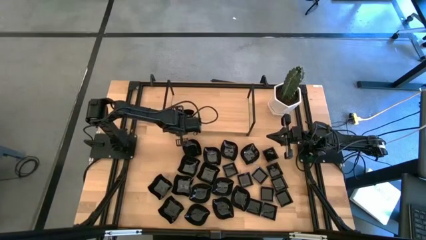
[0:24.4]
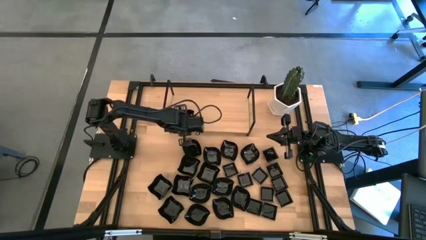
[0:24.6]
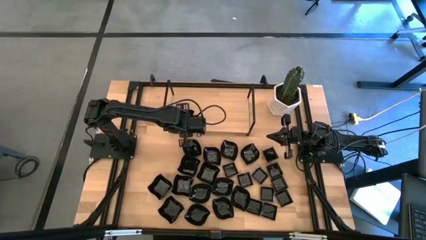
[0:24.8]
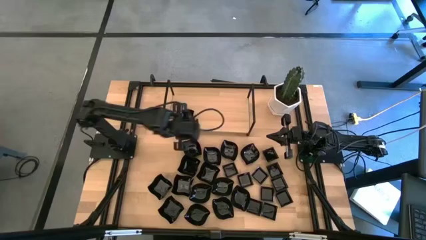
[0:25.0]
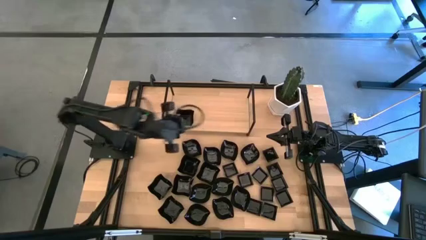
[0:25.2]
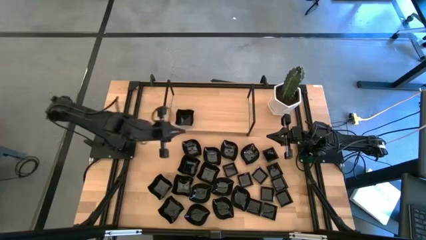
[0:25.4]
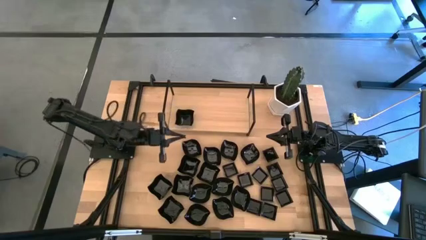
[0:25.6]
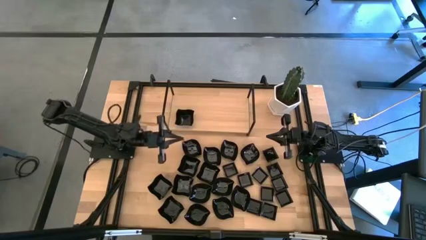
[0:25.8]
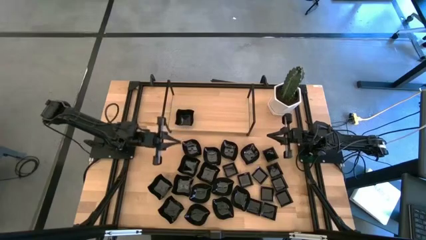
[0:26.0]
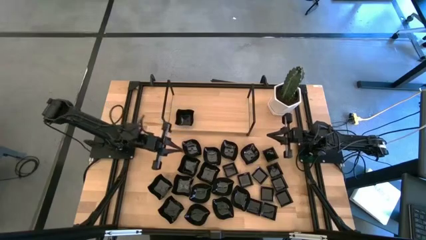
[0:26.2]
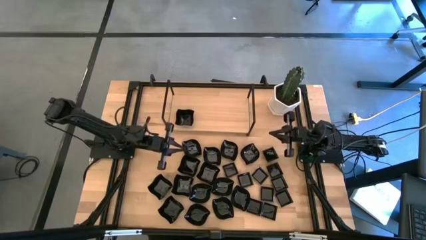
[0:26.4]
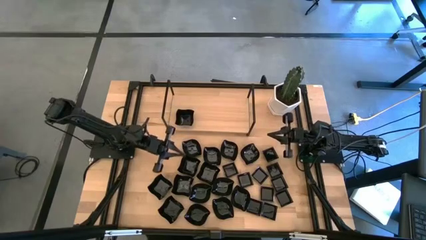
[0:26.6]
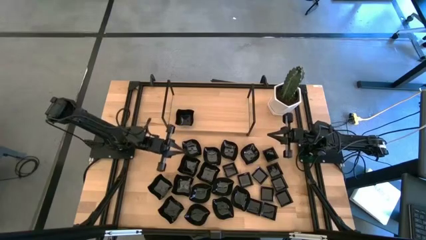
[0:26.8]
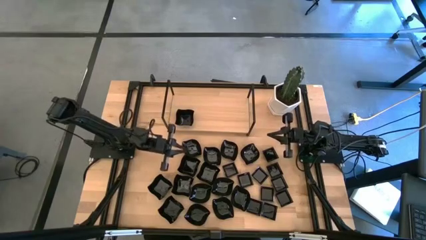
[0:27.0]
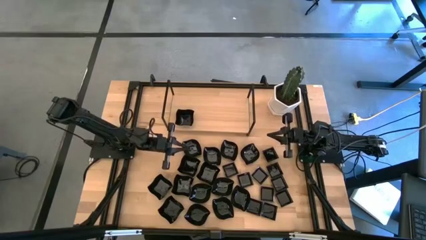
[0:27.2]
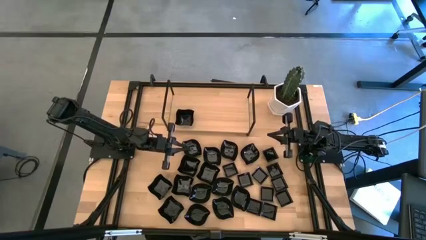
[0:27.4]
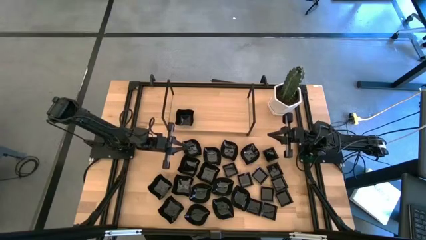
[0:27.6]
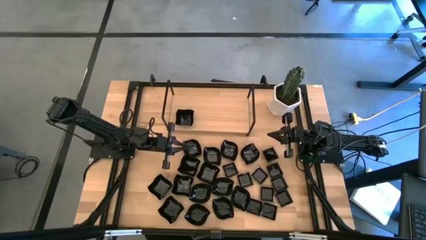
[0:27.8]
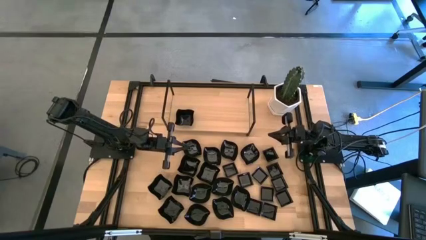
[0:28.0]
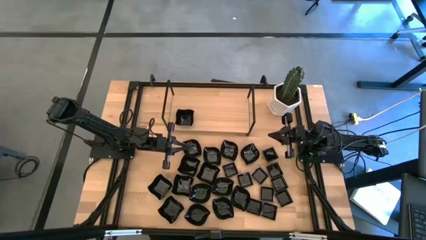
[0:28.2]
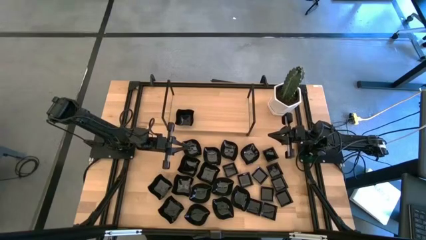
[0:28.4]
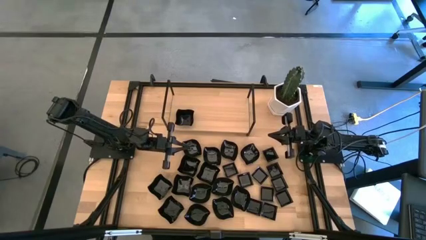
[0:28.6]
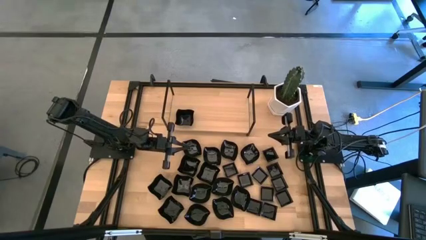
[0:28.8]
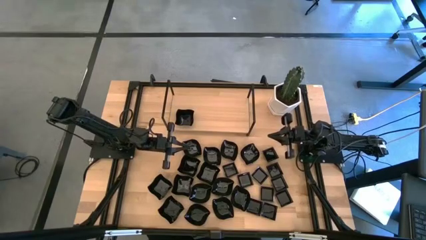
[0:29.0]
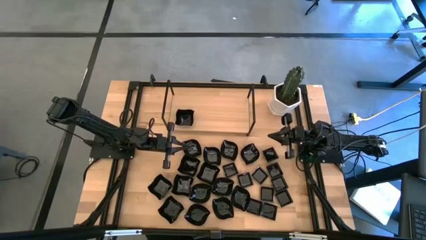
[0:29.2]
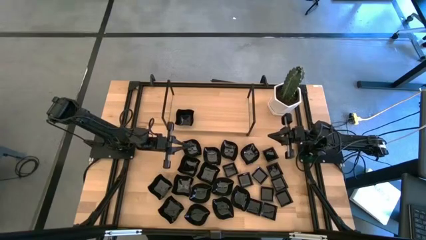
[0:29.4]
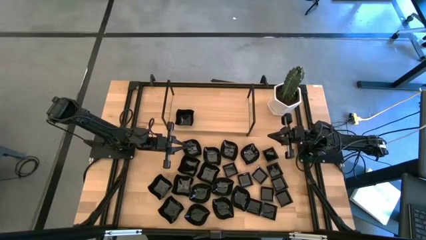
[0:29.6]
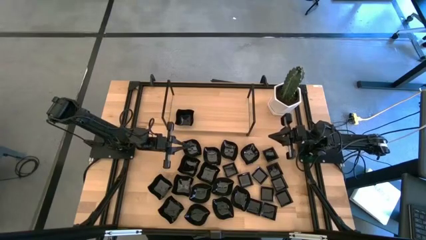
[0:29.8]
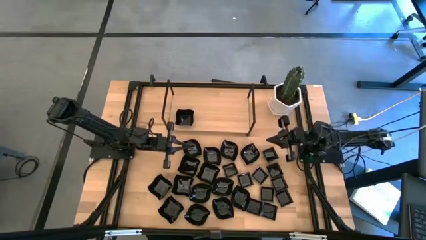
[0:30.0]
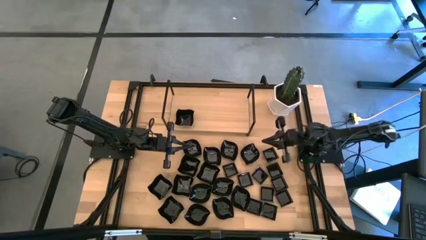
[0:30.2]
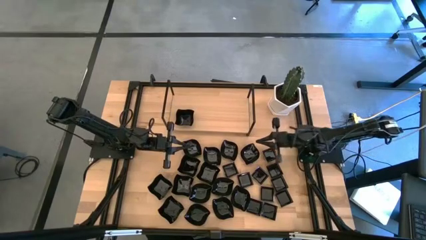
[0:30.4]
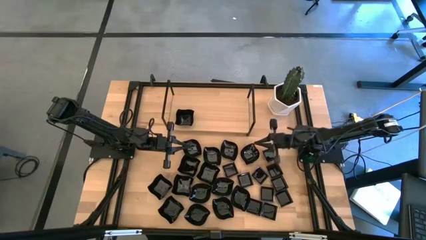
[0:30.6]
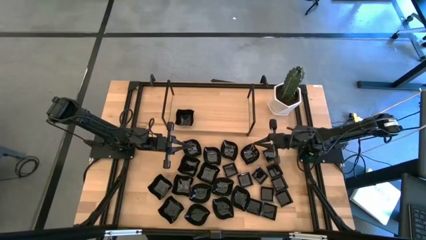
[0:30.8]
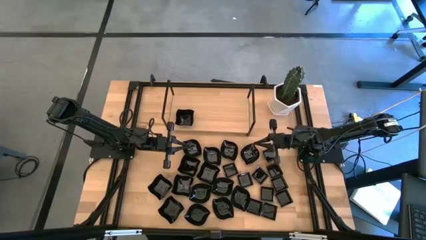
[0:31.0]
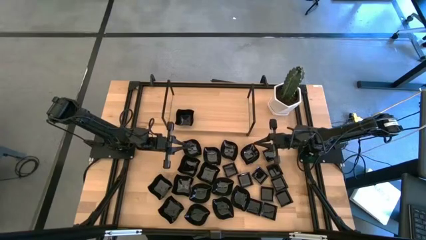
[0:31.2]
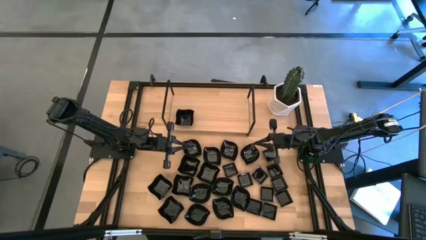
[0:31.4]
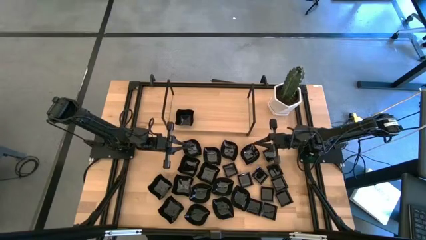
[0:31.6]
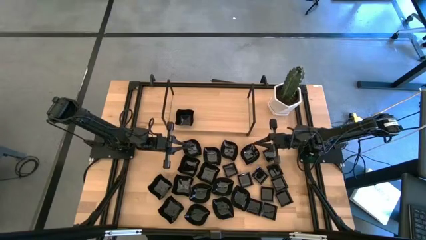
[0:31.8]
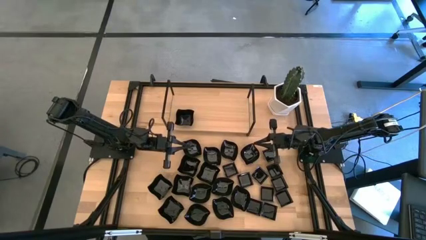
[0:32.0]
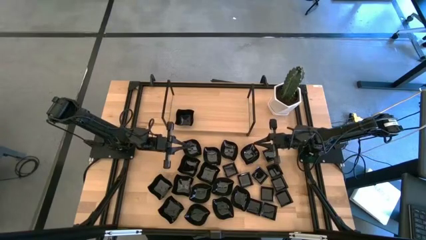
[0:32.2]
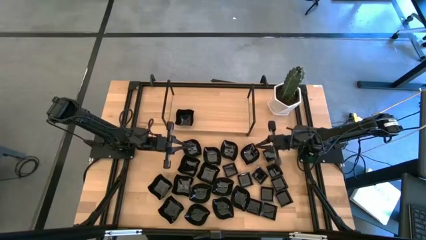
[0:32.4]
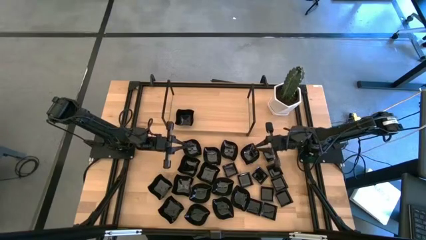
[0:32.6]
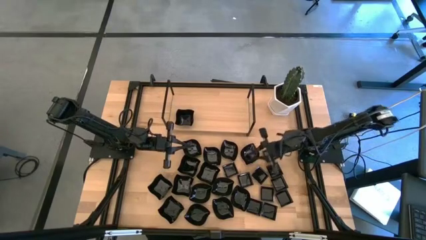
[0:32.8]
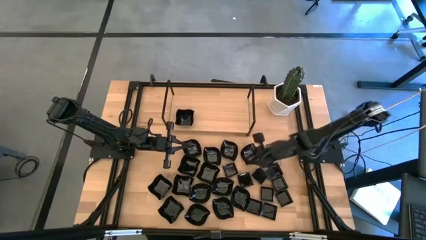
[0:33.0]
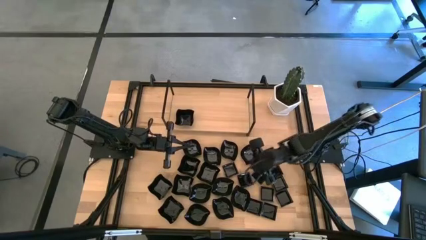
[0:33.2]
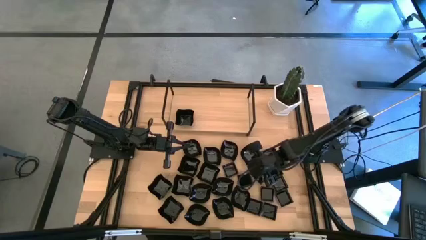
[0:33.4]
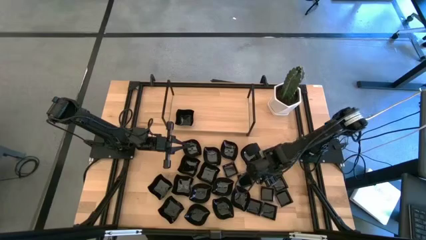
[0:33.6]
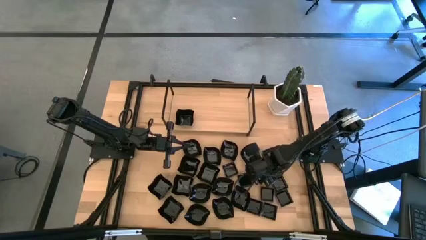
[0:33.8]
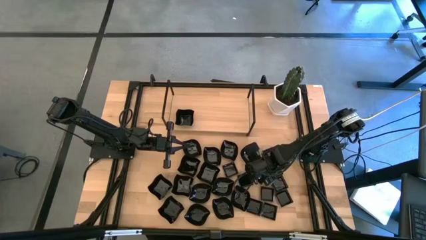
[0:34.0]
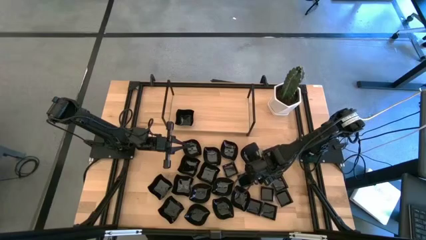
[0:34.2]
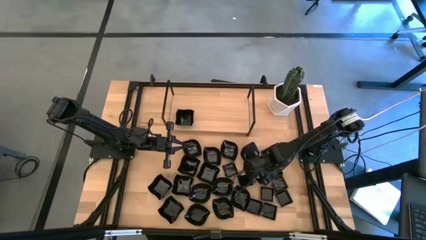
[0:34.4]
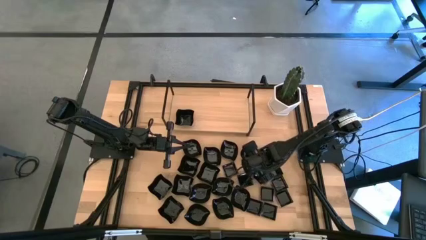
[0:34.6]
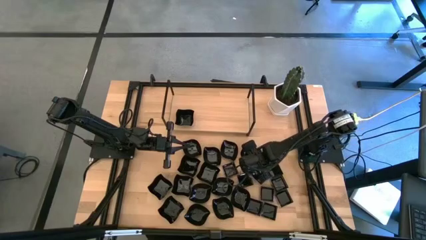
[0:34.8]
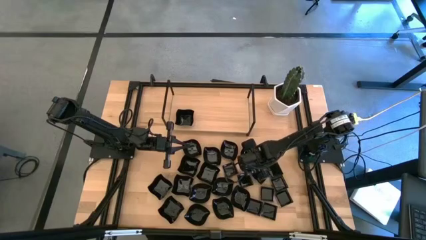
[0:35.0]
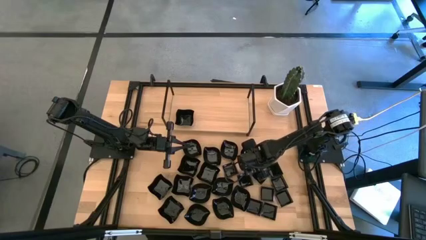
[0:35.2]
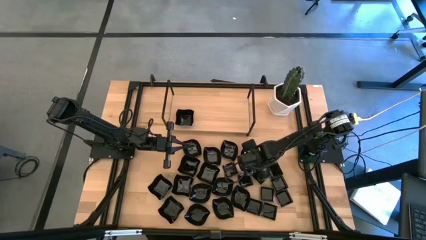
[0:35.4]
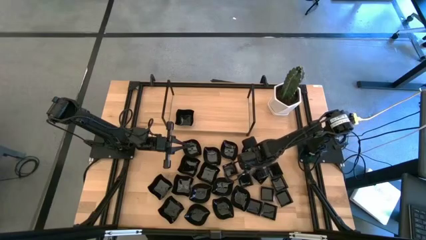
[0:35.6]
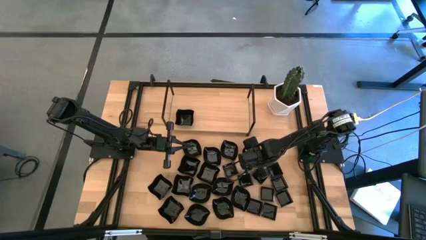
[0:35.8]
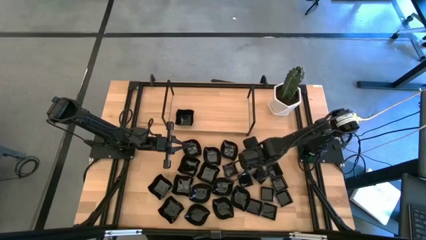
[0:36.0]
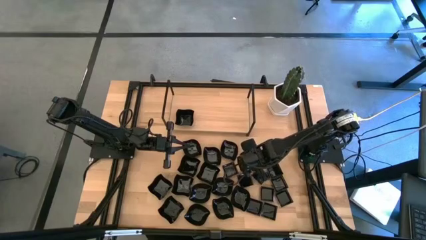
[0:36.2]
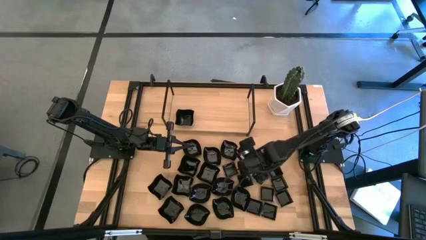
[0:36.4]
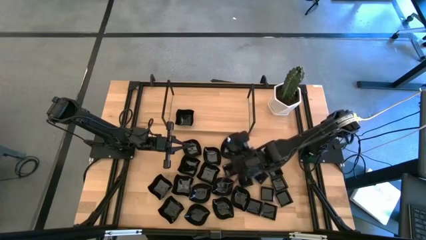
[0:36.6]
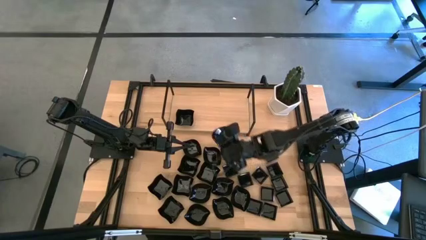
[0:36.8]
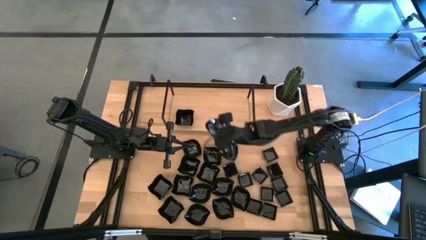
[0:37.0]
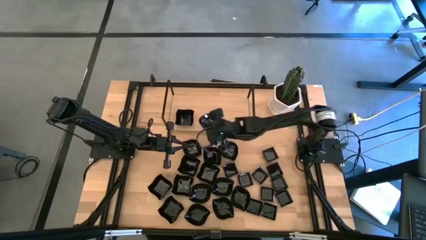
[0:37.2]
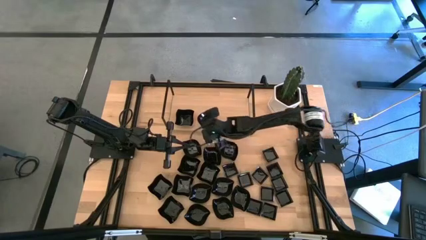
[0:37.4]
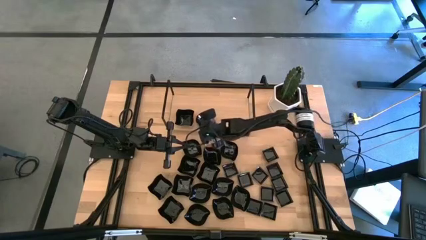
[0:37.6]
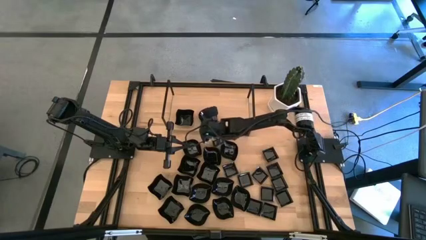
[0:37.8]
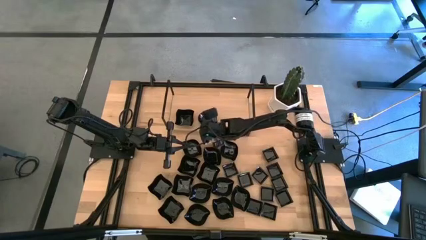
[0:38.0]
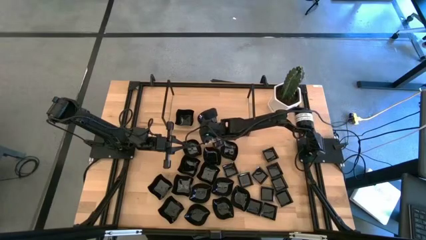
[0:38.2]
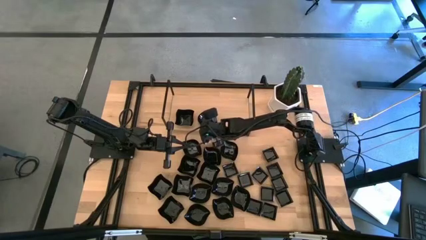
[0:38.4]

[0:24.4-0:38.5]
Task: Pick & Place Mini shaped plates
Put the leaf-shaped plate on the shelf

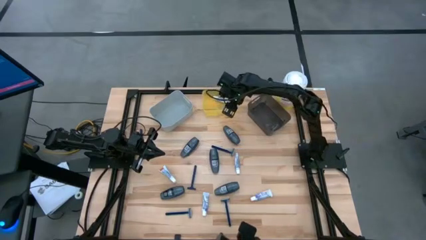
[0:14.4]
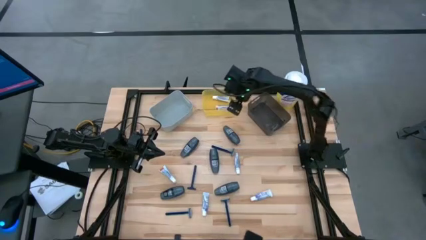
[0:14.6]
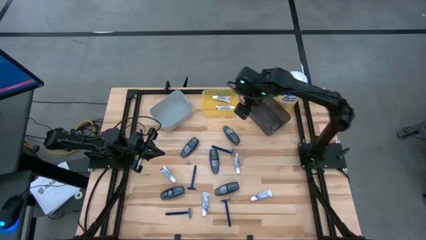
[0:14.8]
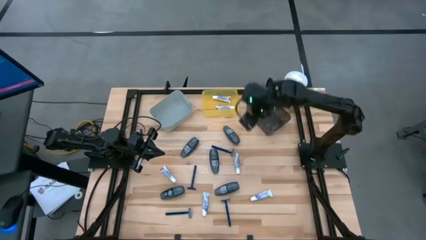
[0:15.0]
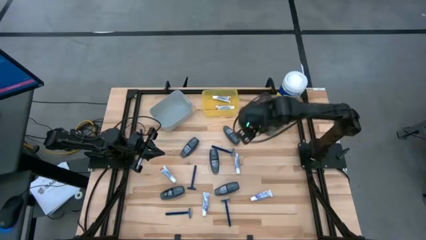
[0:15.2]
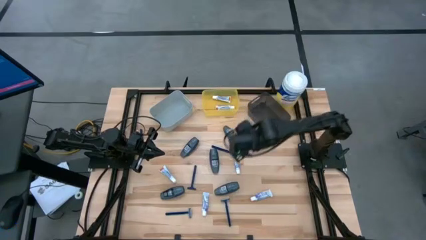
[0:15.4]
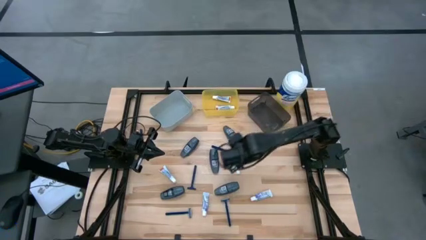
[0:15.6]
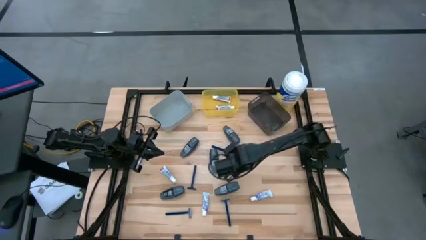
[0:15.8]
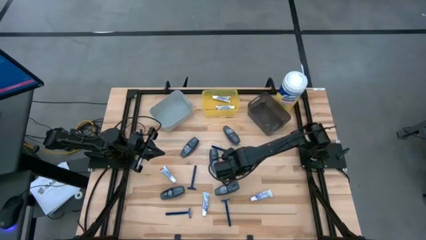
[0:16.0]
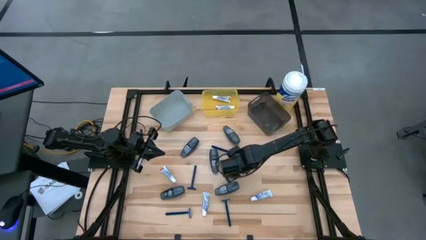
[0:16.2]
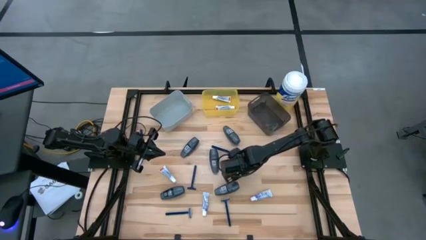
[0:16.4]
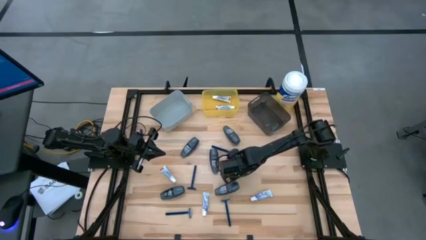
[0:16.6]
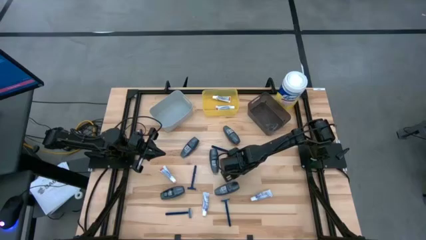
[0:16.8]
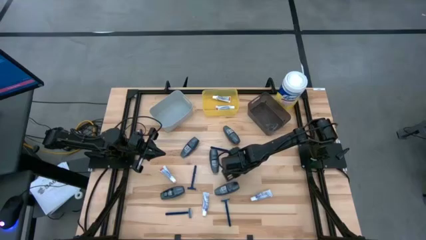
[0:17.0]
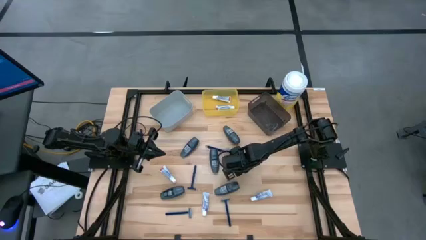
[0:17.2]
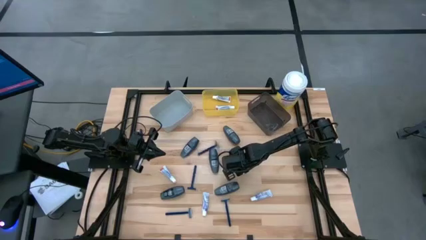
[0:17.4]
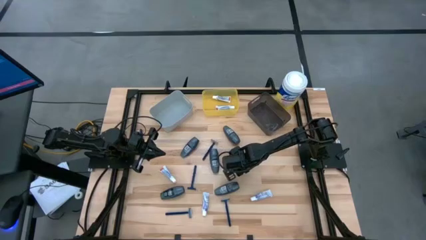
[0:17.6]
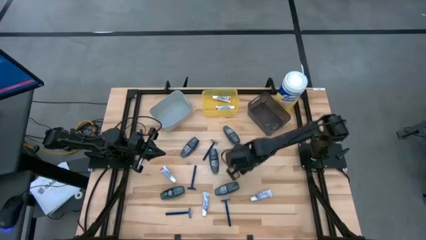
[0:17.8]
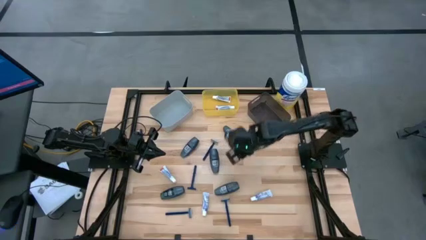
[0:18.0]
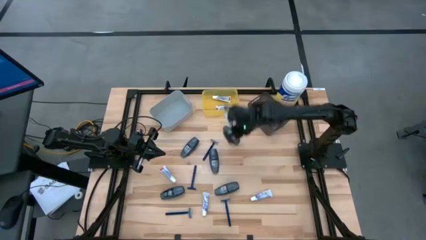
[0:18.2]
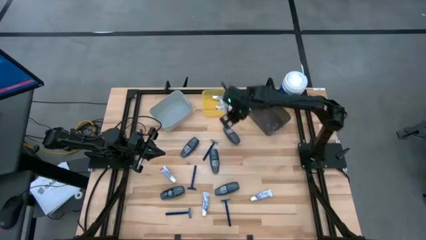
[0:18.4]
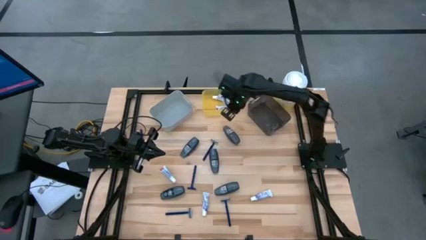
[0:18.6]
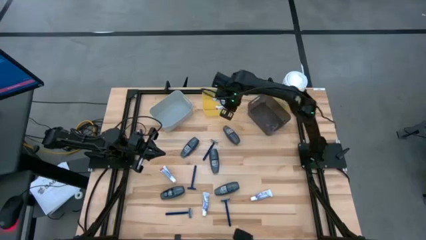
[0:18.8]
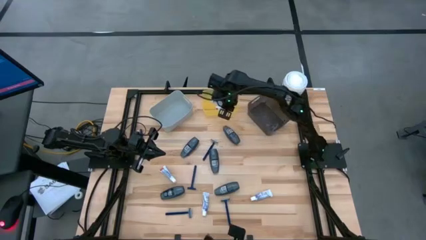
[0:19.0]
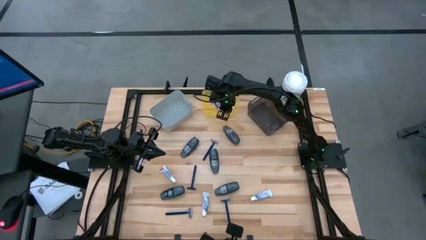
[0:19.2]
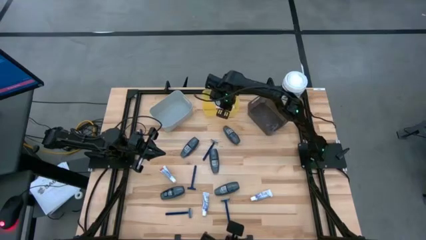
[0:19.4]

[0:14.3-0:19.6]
Task: Pick & Place Travel size toiletries
Put the white toothpaste into the yellow bin
